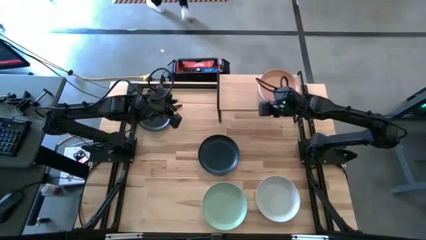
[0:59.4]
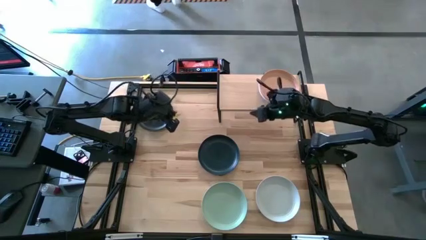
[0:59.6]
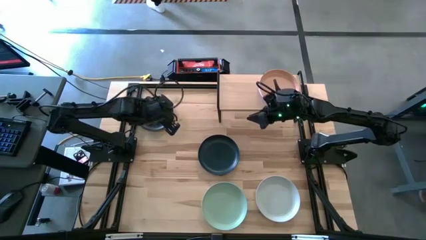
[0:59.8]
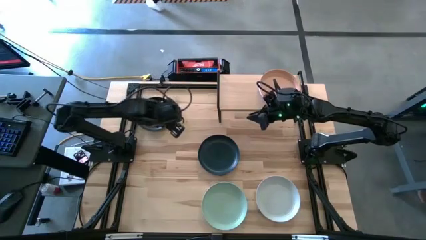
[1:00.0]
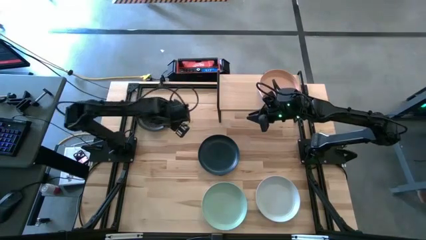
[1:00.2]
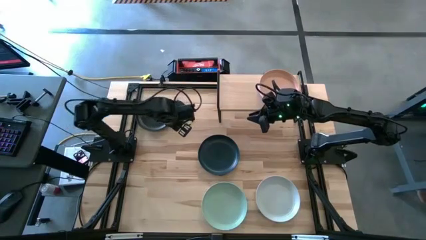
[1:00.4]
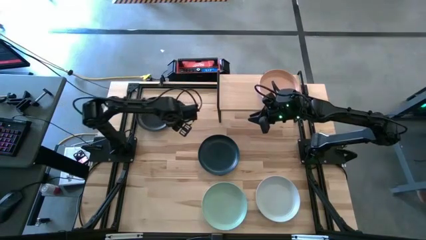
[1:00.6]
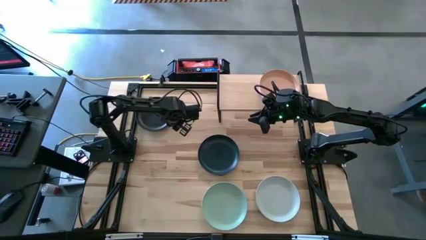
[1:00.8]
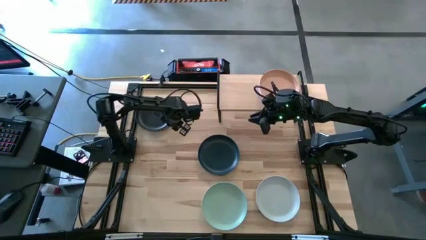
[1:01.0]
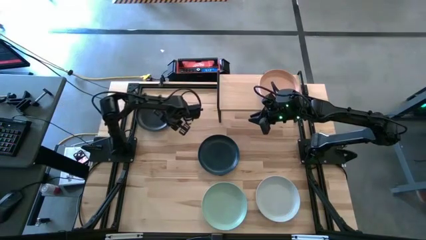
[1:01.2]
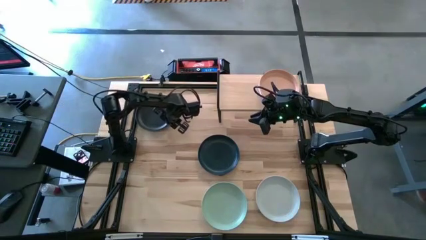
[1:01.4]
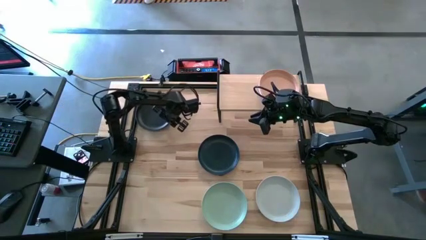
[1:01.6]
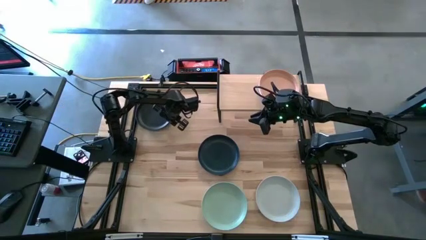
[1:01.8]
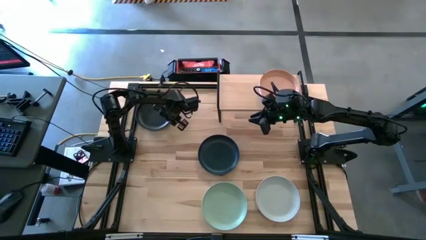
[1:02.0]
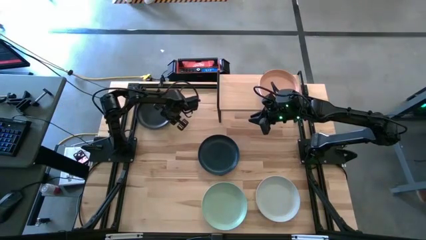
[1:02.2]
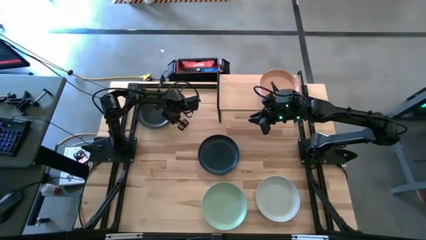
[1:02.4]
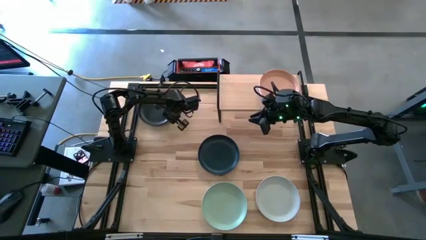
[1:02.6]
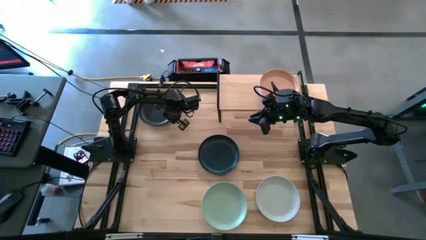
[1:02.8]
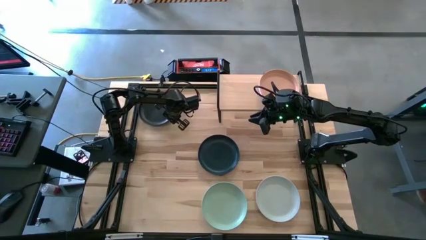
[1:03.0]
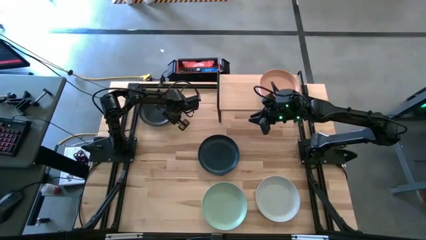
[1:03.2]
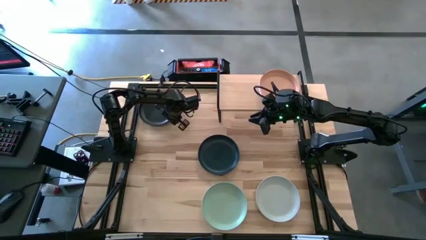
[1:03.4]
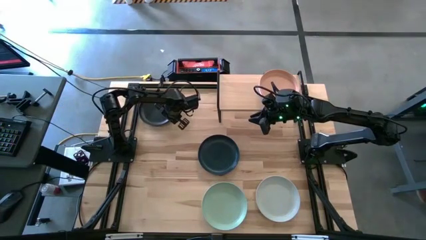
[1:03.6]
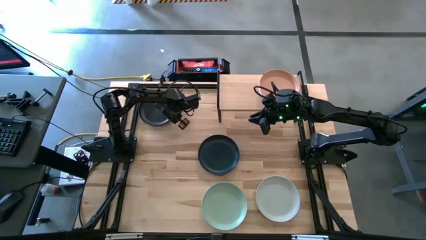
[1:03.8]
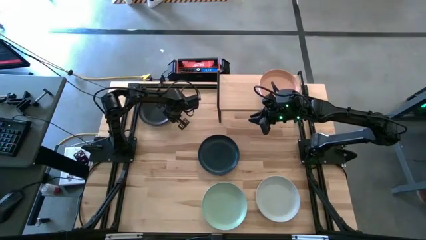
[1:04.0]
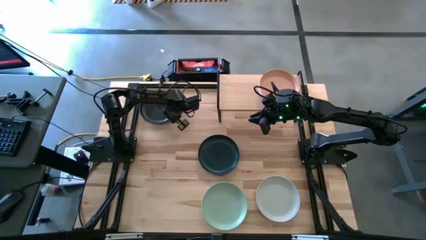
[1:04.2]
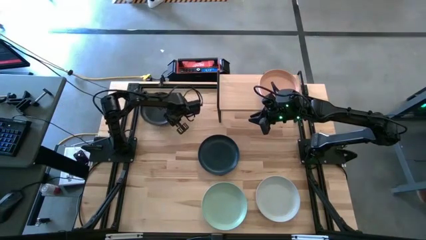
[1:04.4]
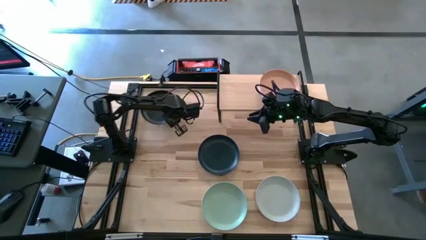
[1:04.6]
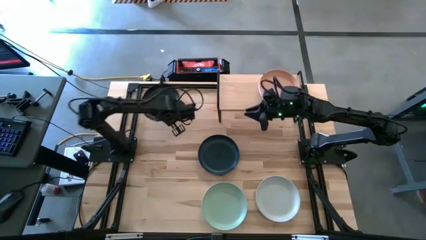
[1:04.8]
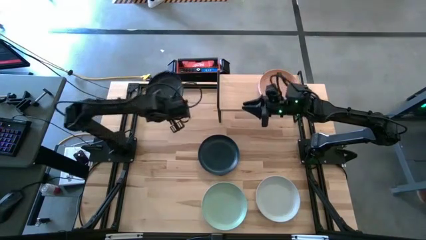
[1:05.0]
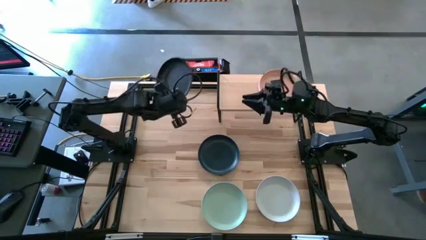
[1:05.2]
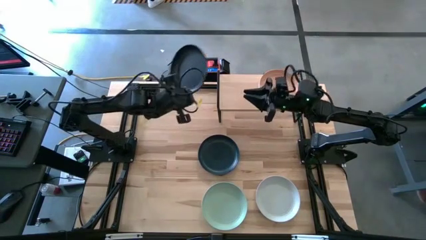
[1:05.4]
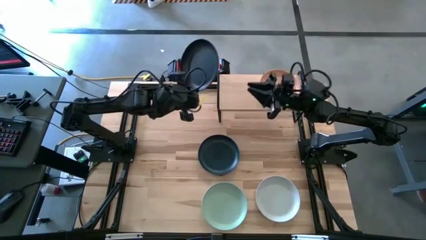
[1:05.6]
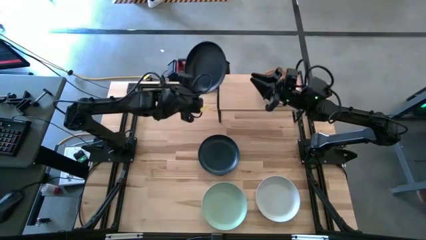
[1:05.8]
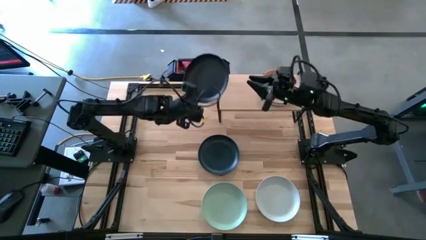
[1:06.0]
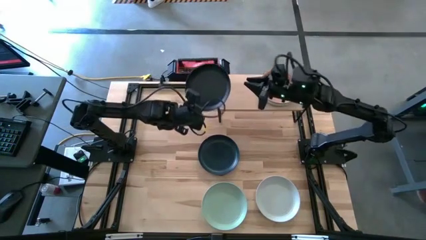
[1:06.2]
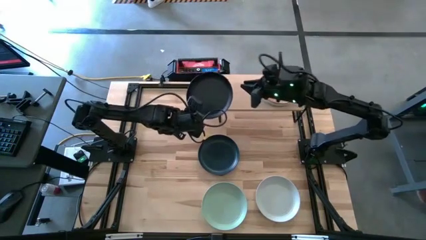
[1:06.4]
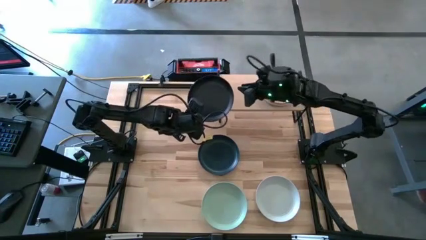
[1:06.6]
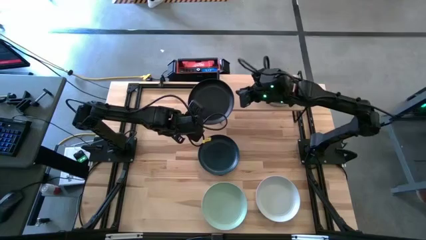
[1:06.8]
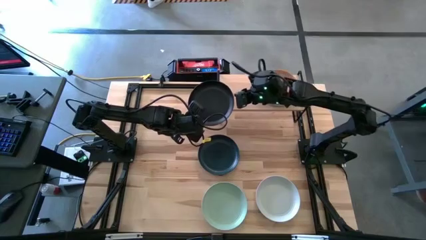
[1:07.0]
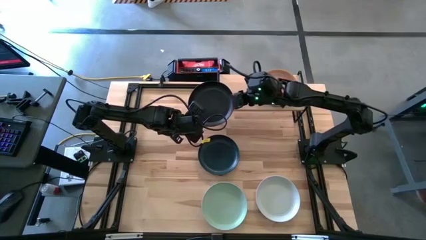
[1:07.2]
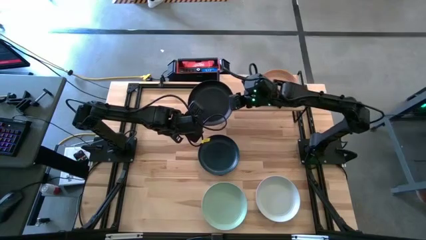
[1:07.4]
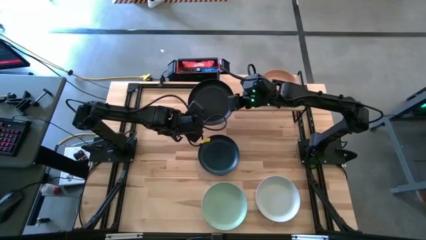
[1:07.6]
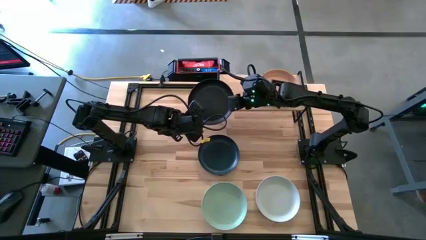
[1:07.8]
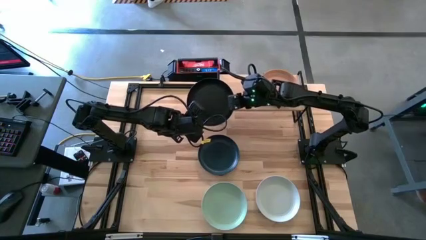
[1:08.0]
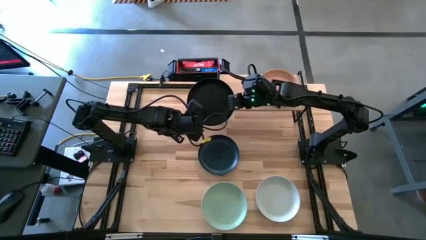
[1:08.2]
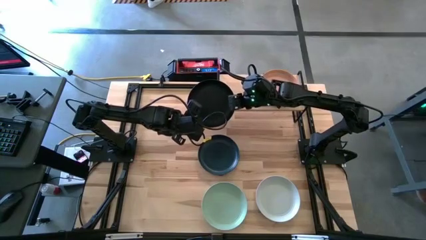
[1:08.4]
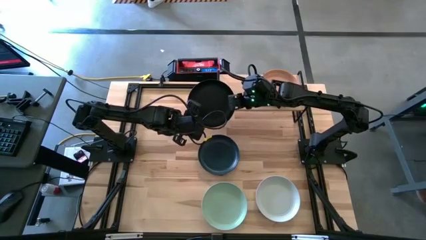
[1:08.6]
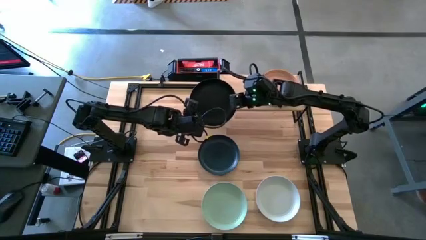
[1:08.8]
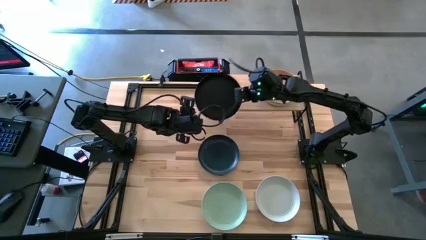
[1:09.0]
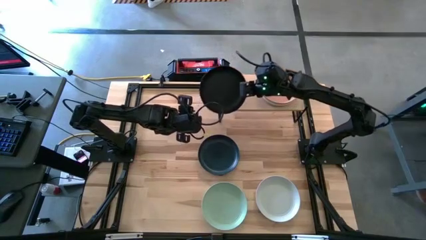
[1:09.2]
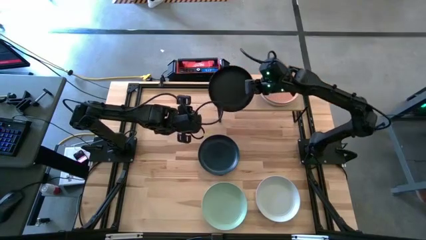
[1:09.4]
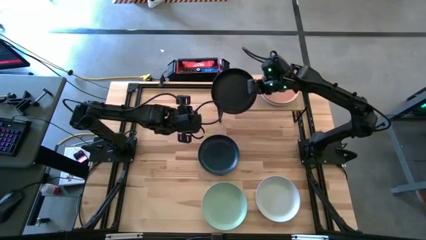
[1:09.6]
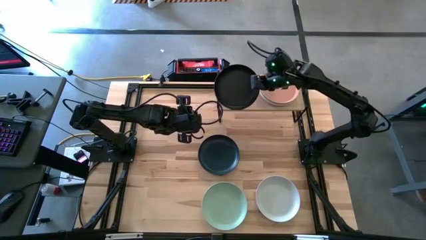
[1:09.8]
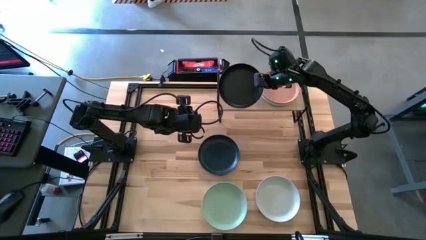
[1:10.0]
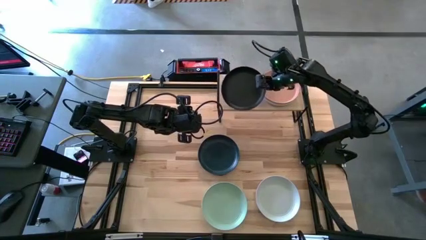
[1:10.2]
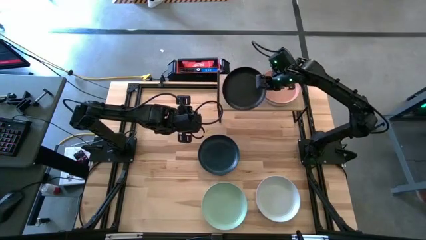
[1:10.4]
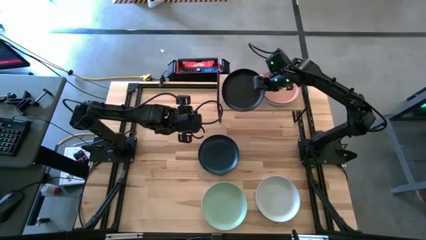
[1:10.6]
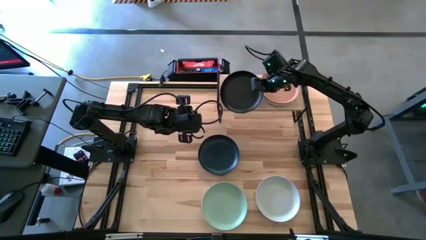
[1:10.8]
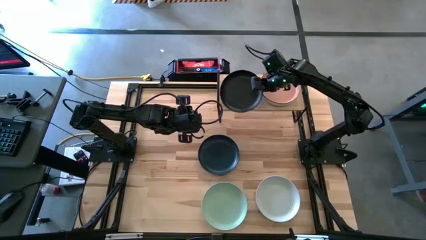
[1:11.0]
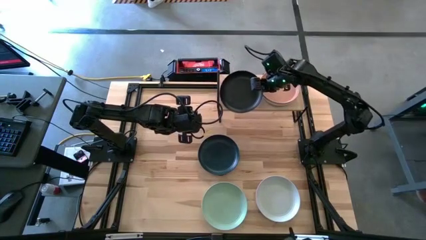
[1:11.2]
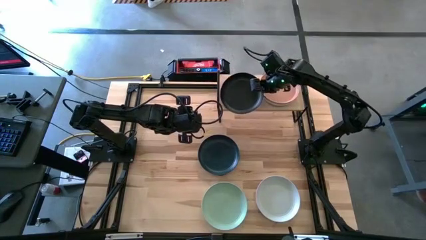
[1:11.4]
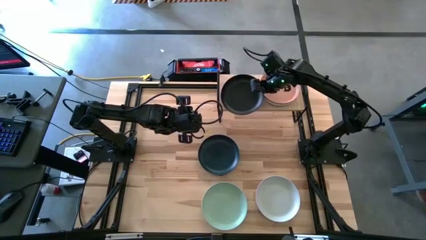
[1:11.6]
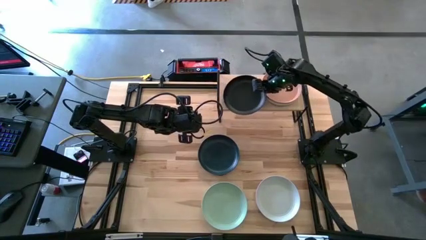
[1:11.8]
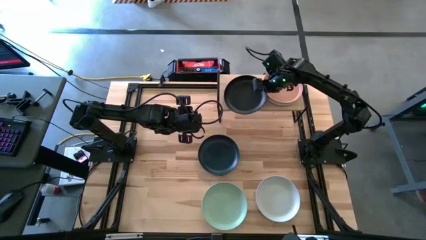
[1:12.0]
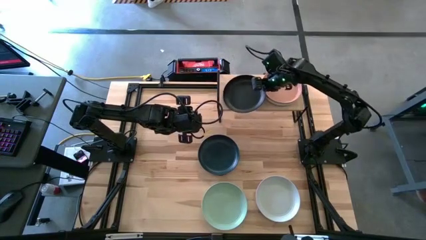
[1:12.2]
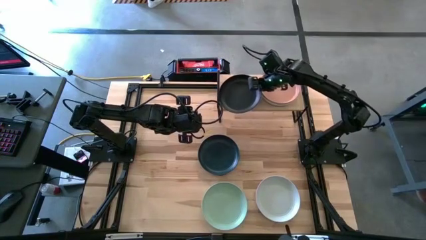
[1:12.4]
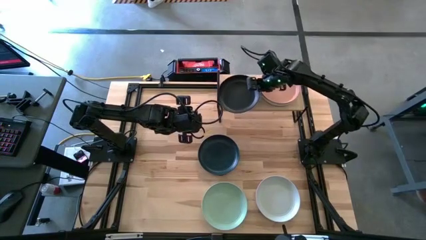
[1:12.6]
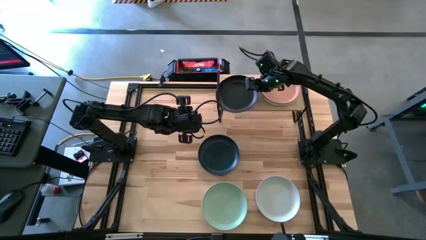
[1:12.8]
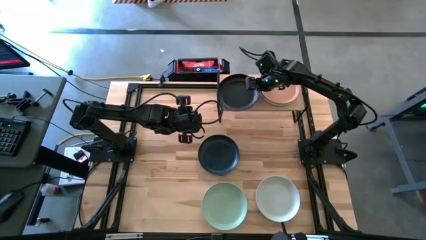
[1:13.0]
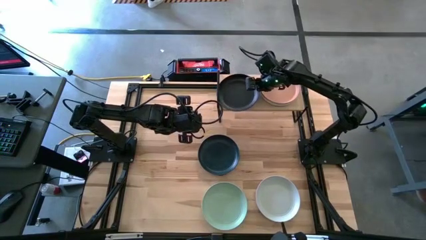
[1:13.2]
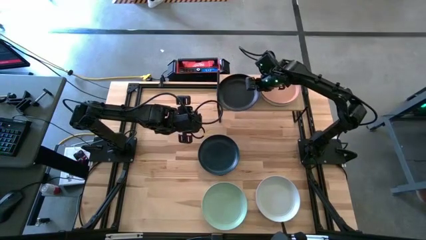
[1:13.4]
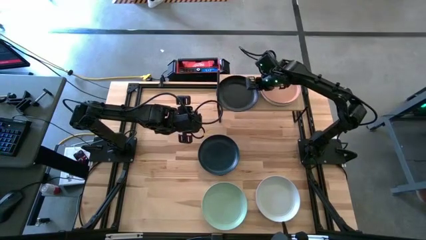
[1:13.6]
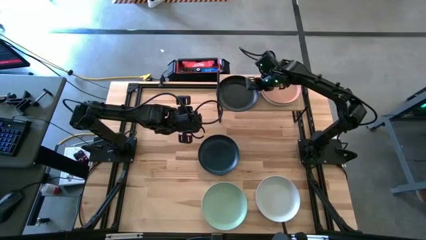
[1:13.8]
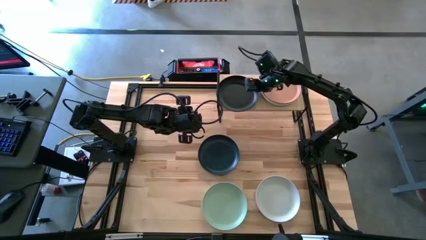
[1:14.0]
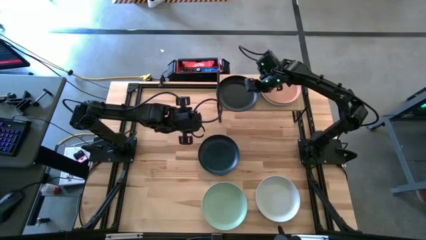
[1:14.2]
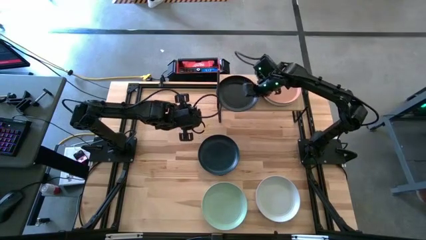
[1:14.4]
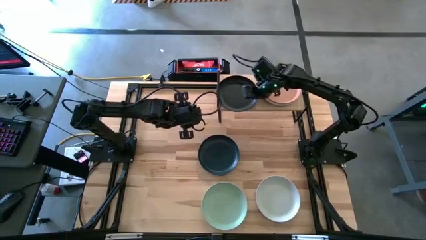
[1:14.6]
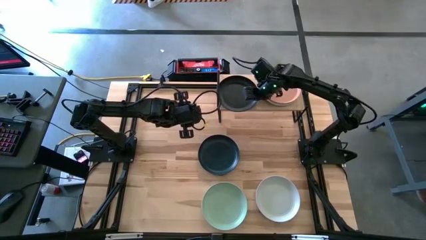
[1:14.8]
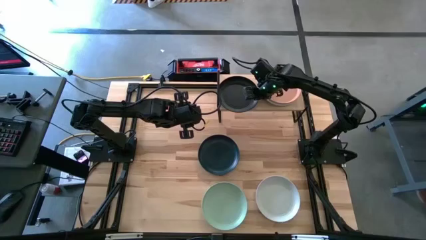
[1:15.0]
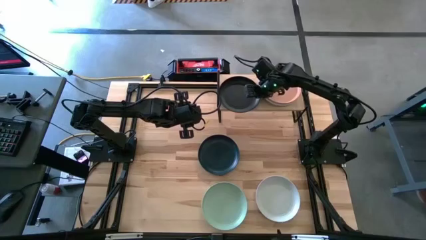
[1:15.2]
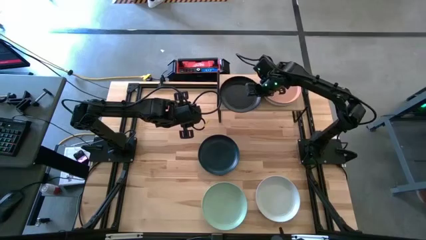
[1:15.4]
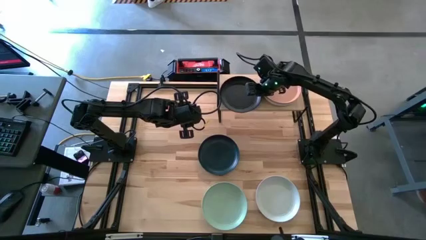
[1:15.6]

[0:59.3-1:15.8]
Task: Place and stack plates onto a shelf
Put the top black plate on the shelf
